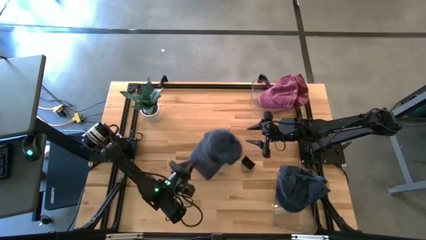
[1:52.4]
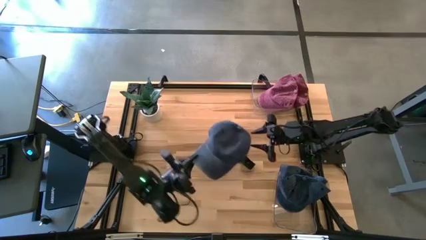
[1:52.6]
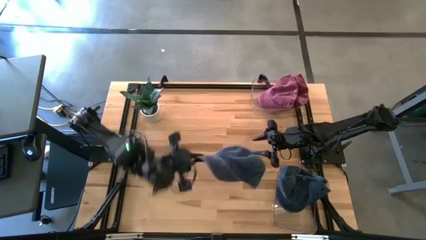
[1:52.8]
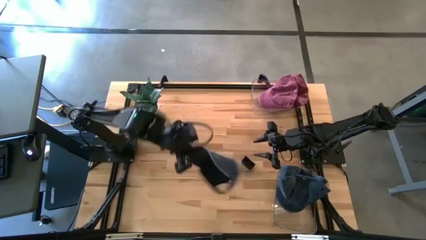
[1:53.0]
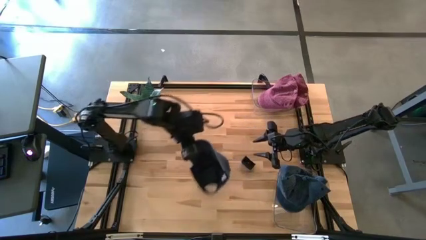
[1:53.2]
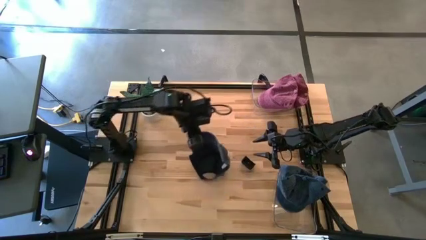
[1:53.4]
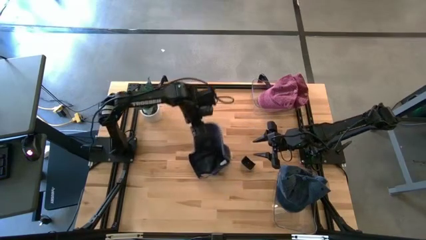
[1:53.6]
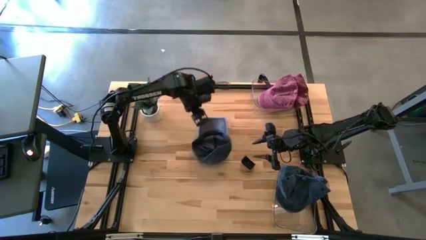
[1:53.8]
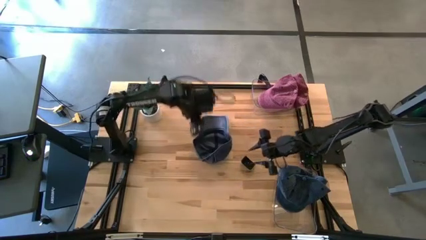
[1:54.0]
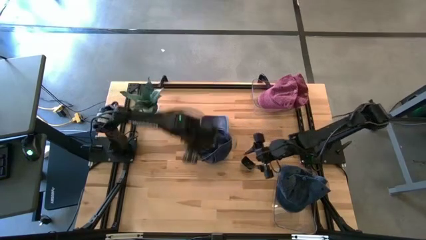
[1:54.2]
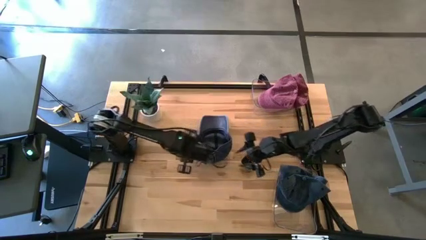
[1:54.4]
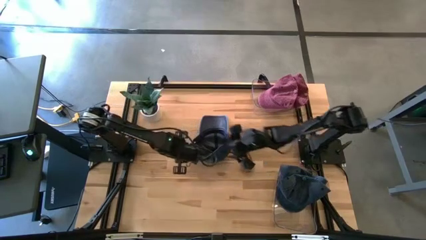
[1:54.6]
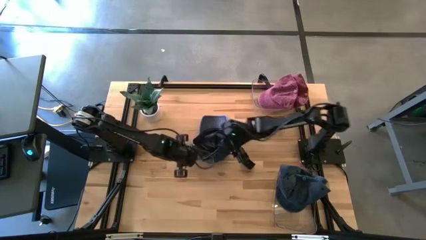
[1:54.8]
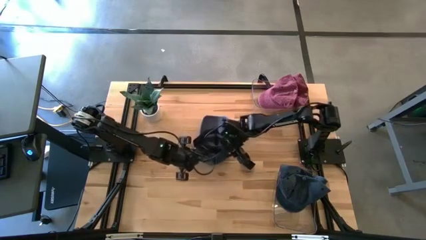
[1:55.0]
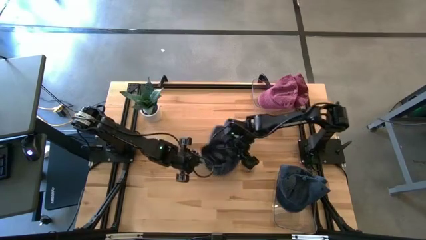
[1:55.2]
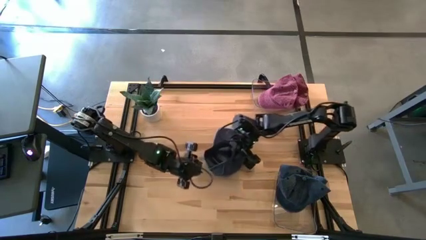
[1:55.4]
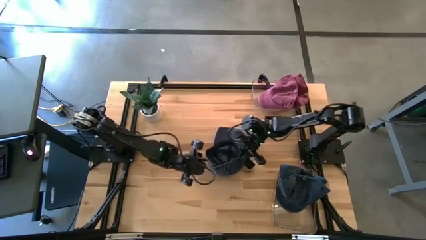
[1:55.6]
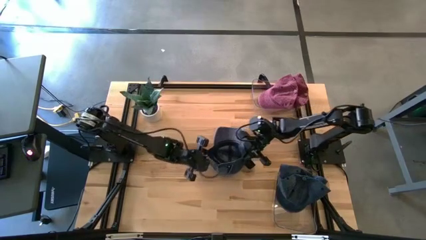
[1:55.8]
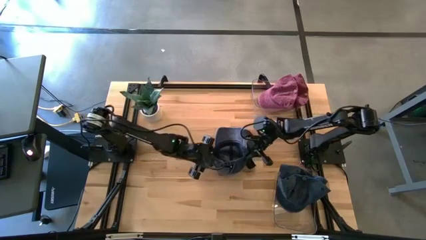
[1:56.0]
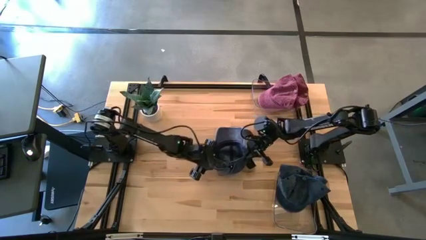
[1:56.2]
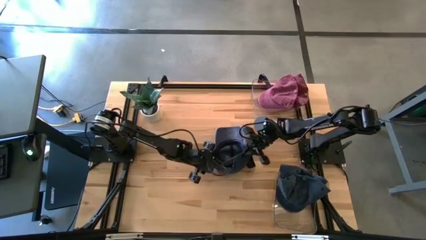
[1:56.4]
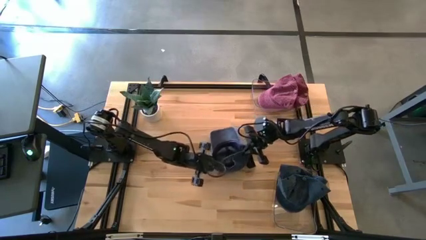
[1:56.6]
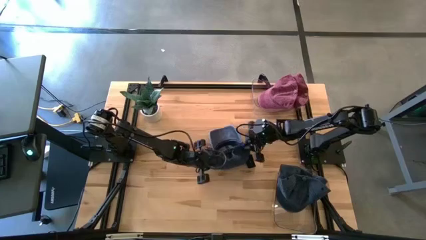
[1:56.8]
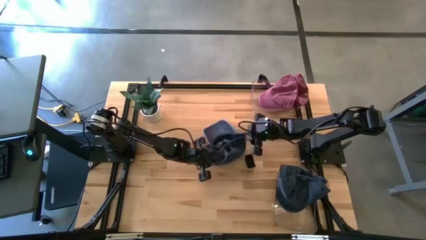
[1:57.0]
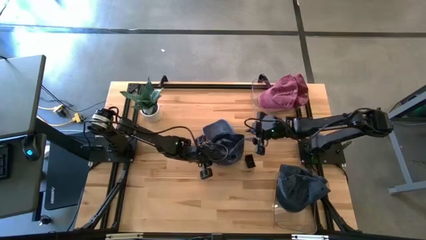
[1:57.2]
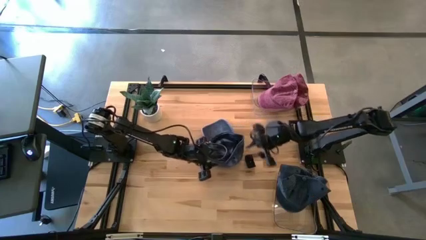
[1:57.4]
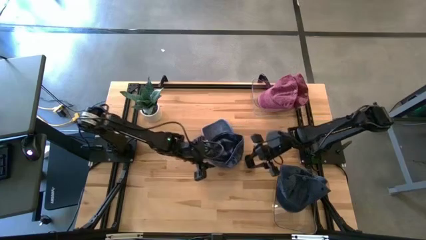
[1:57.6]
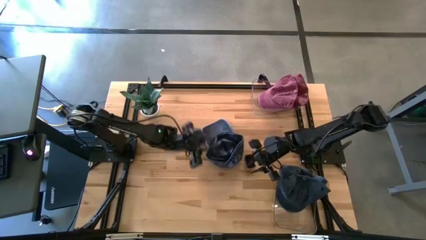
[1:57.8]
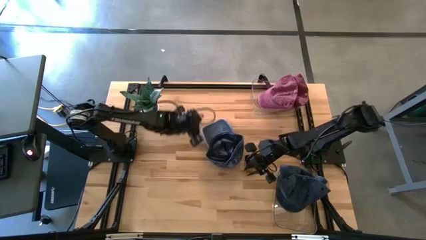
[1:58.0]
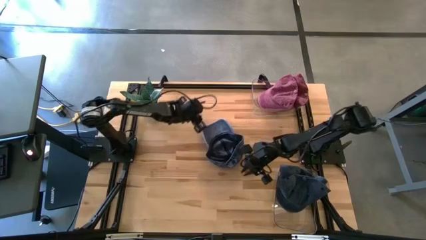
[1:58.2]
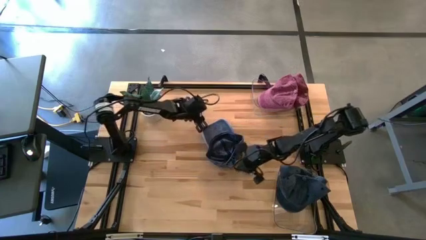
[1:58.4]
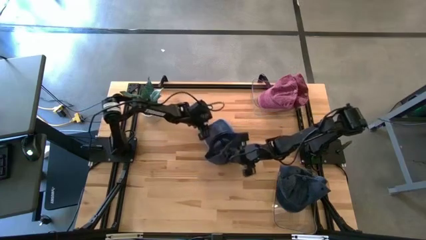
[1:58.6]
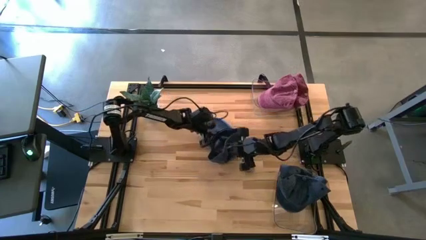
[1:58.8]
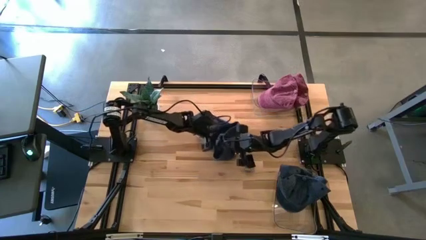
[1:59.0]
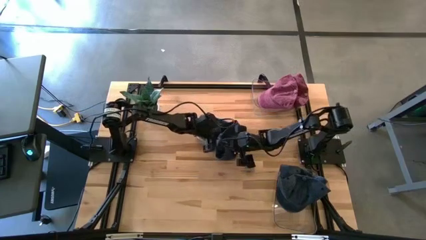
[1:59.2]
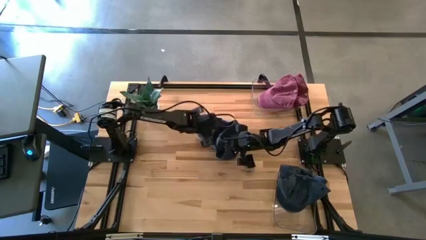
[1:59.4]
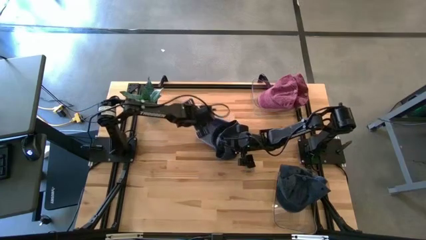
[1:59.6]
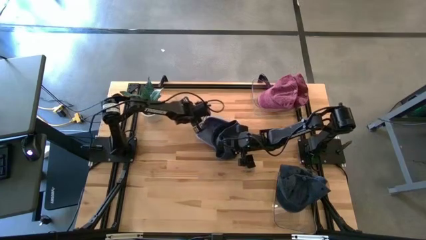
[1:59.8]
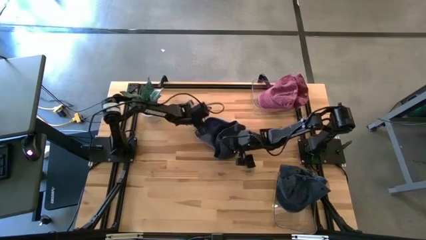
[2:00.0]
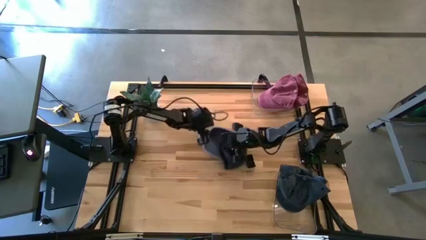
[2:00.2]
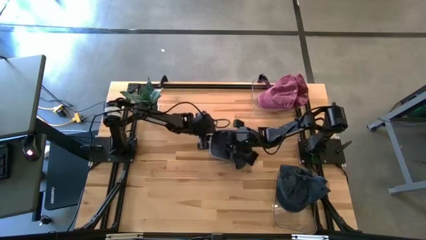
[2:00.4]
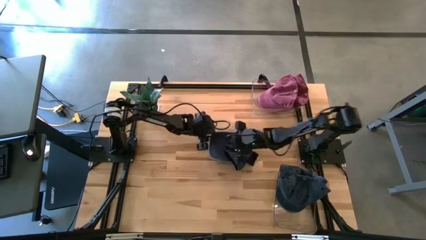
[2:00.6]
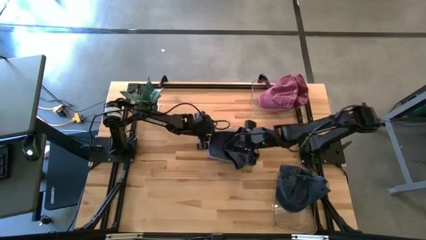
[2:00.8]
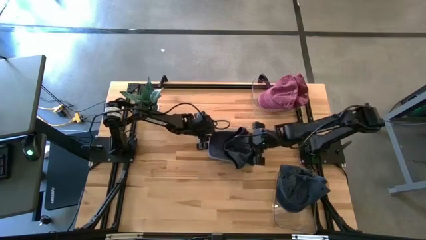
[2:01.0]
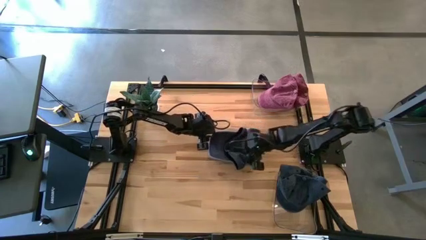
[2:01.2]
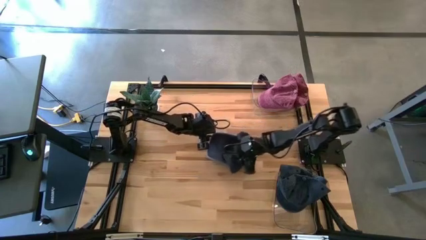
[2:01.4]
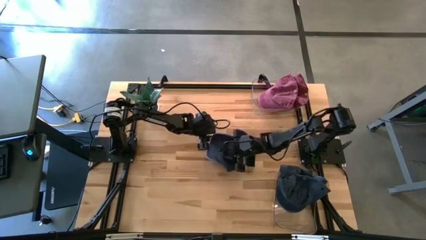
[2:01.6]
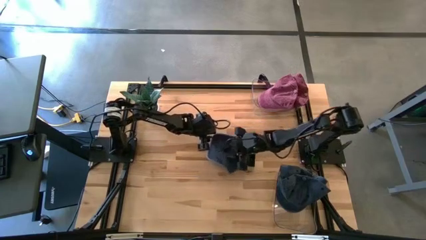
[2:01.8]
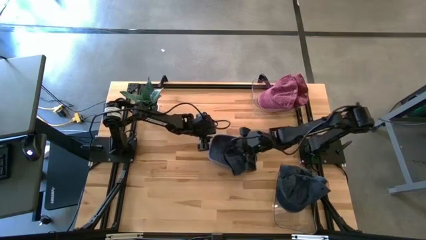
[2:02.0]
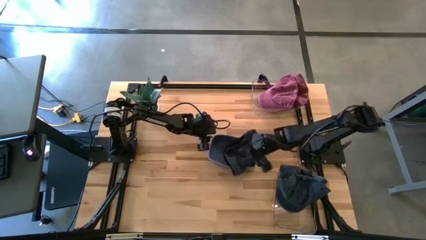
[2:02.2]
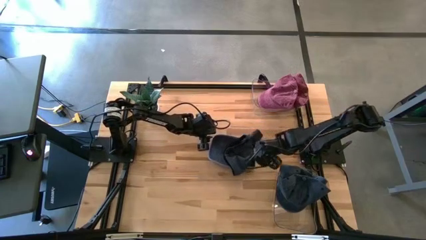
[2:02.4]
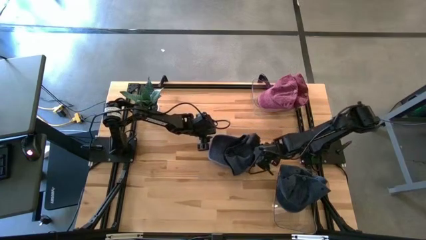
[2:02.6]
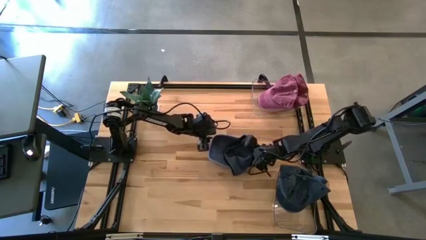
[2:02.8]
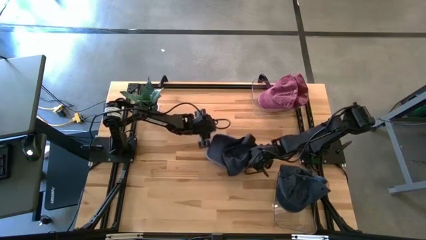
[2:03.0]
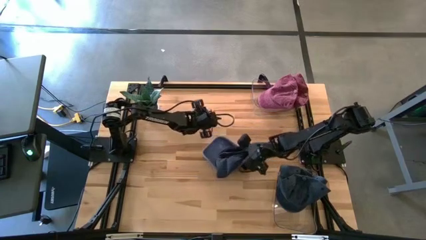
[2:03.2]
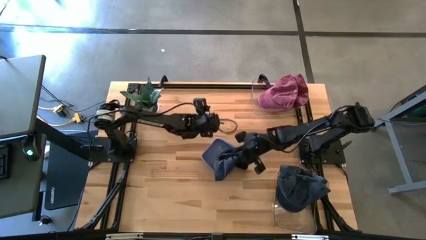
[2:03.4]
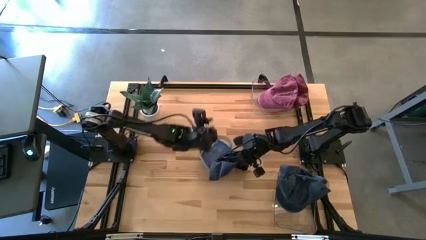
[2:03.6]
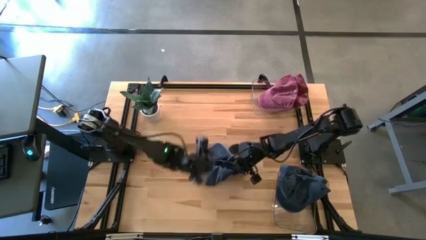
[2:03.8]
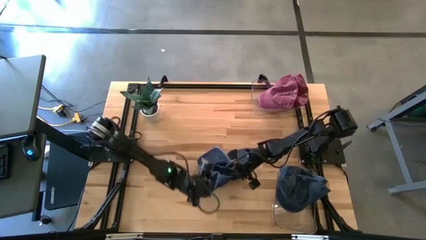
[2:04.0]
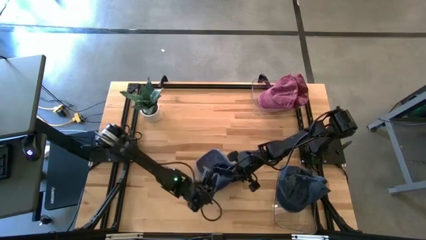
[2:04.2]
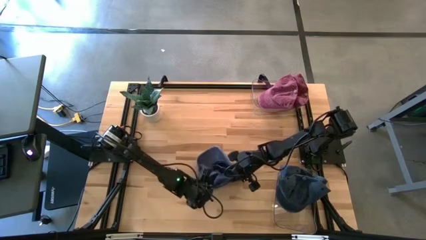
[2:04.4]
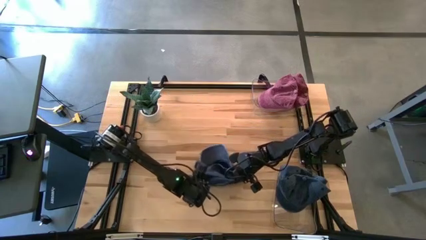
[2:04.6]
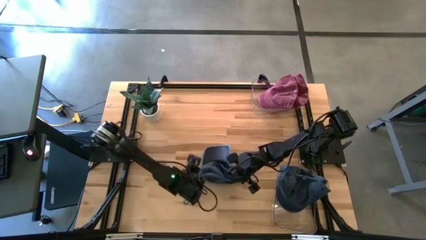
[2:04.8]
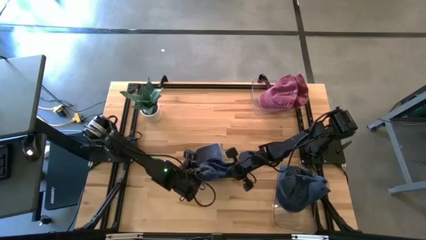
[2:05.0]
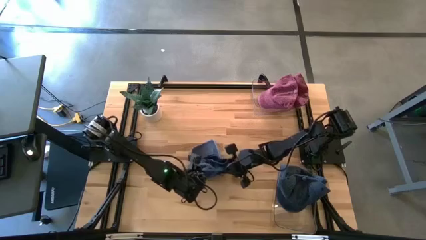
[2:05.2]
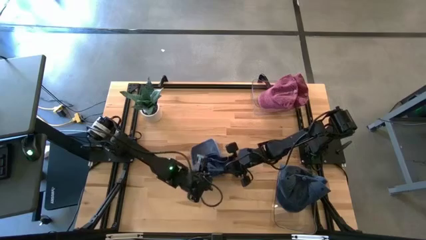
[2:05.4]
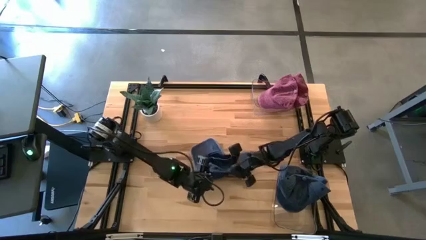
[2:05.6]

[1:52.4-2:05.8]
Task: Pick & Place hat
Put the blue cap into the bottom transparent bin
